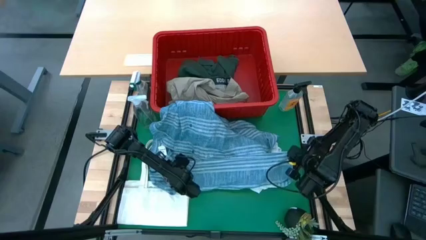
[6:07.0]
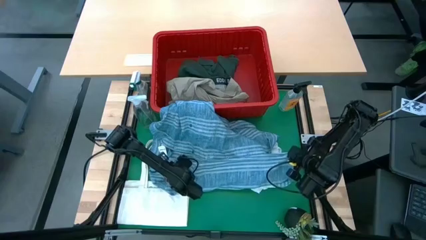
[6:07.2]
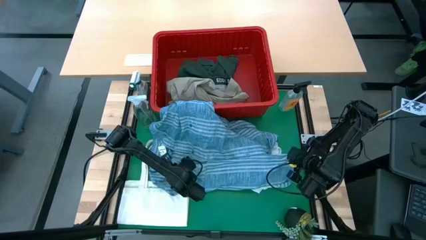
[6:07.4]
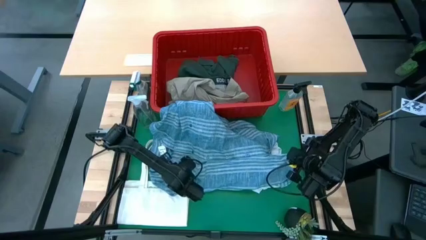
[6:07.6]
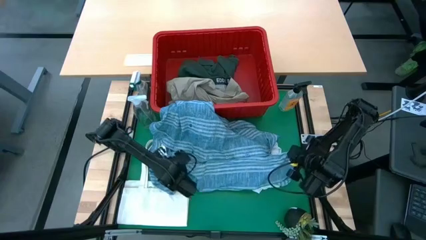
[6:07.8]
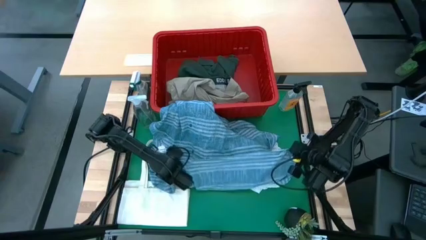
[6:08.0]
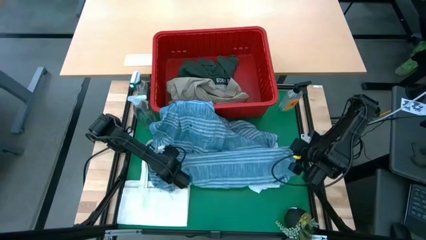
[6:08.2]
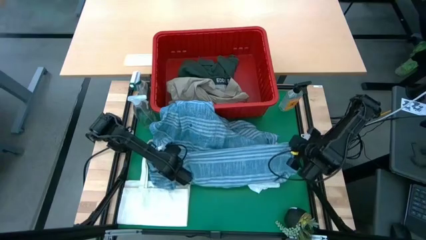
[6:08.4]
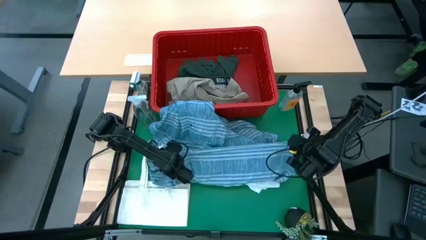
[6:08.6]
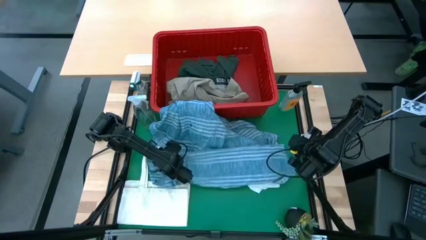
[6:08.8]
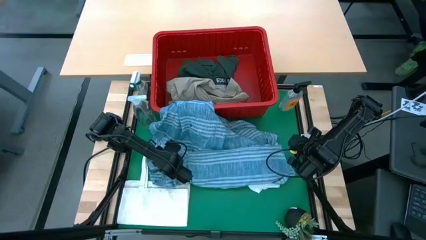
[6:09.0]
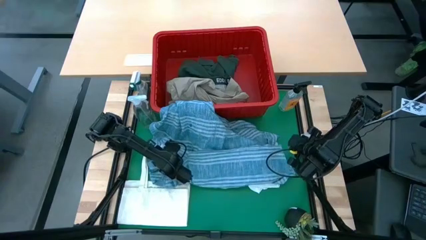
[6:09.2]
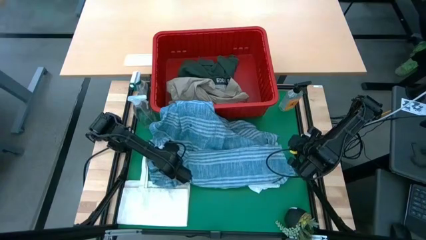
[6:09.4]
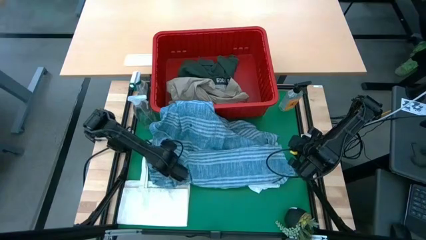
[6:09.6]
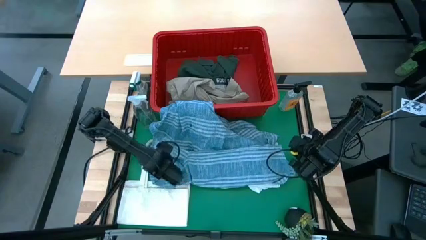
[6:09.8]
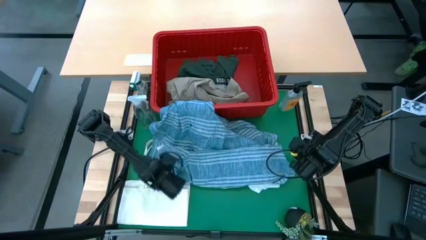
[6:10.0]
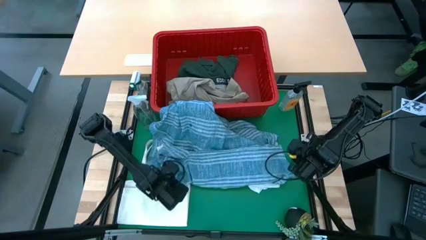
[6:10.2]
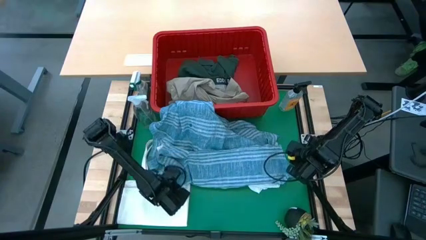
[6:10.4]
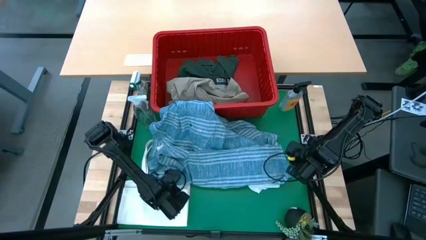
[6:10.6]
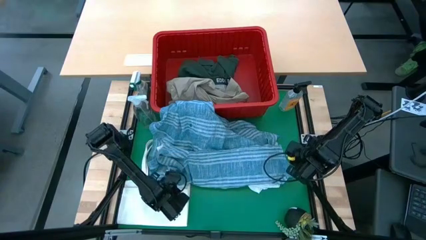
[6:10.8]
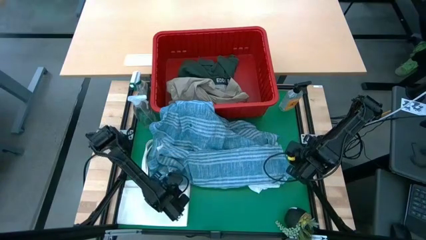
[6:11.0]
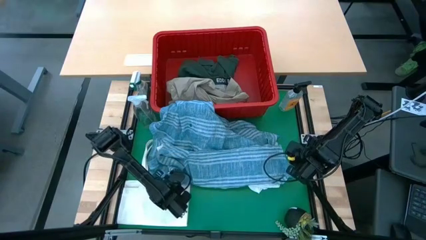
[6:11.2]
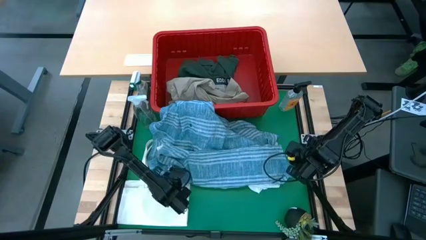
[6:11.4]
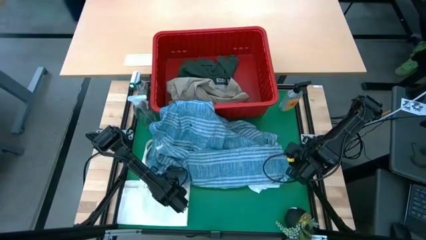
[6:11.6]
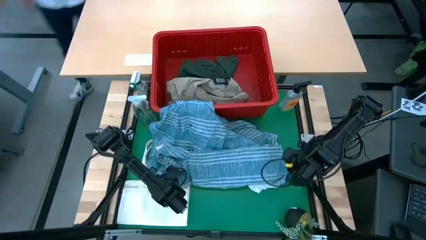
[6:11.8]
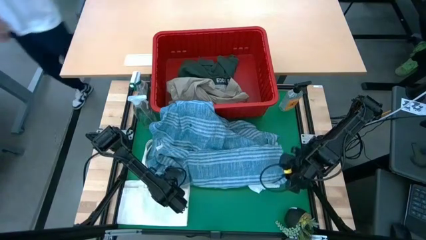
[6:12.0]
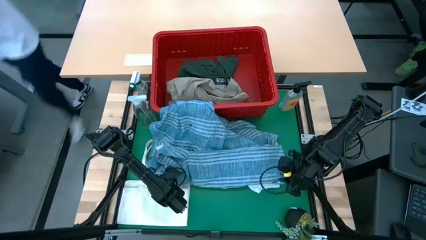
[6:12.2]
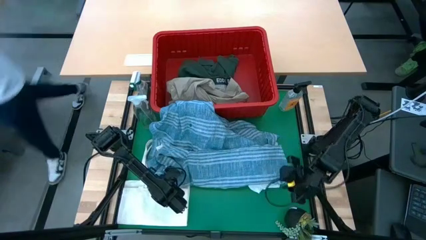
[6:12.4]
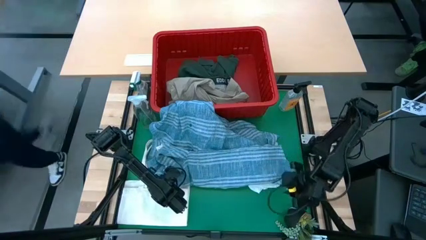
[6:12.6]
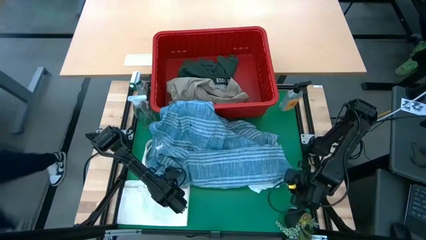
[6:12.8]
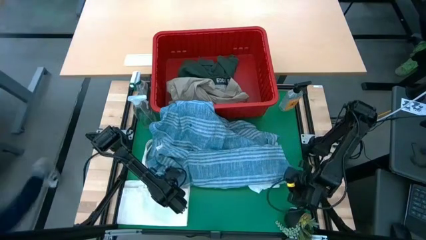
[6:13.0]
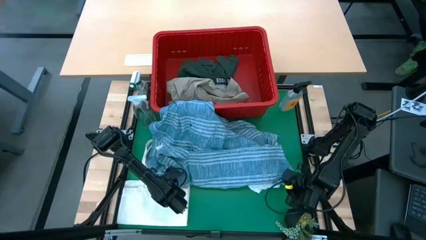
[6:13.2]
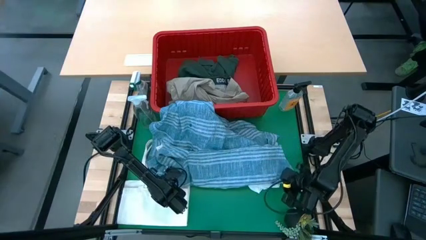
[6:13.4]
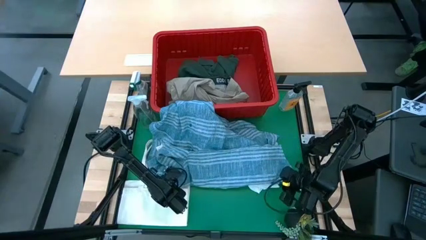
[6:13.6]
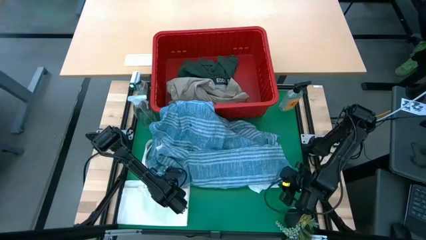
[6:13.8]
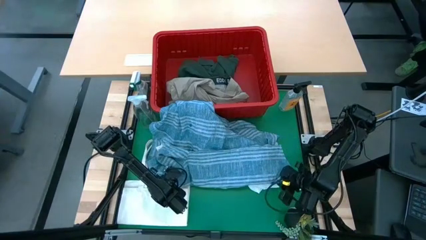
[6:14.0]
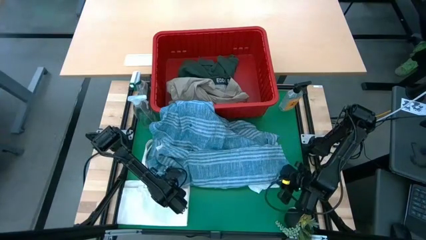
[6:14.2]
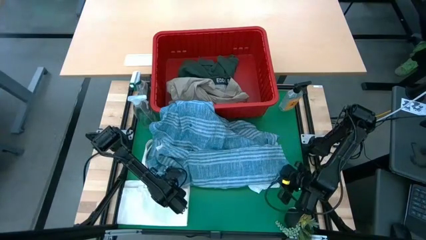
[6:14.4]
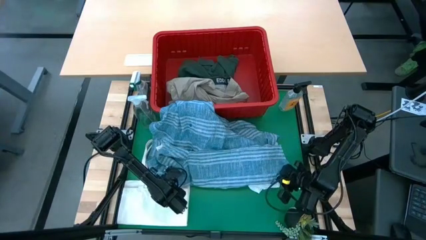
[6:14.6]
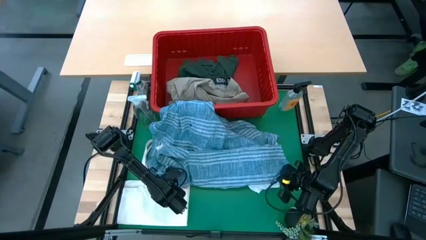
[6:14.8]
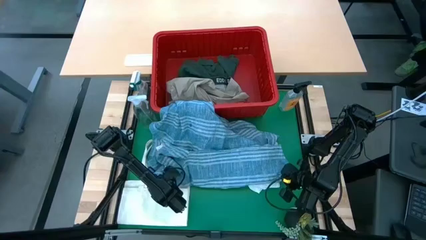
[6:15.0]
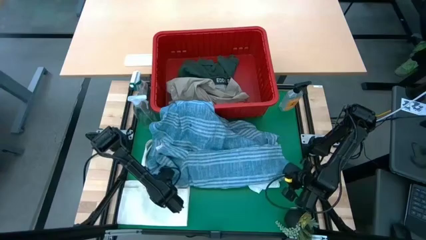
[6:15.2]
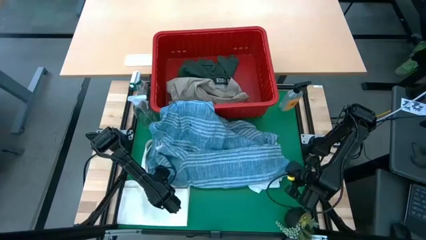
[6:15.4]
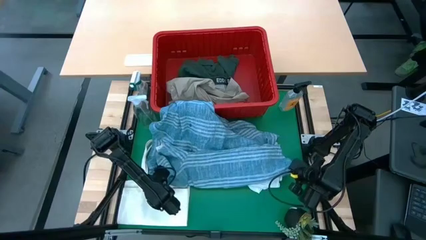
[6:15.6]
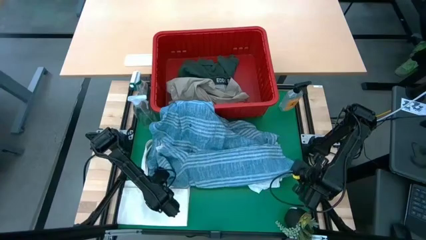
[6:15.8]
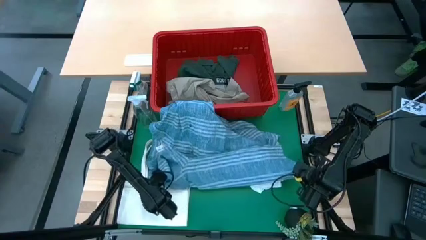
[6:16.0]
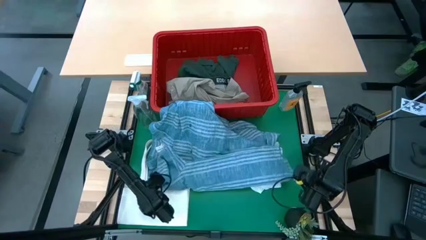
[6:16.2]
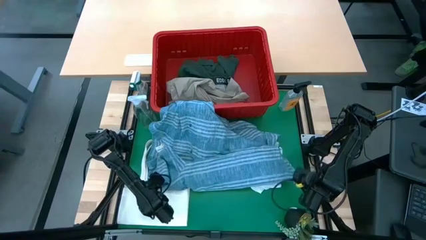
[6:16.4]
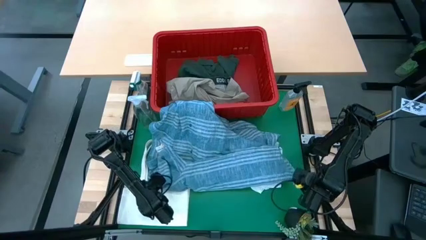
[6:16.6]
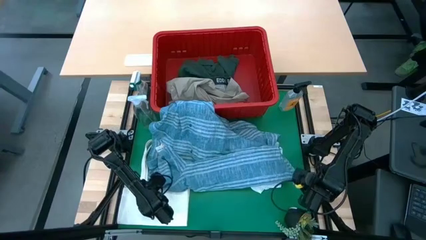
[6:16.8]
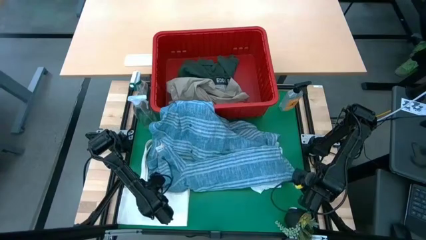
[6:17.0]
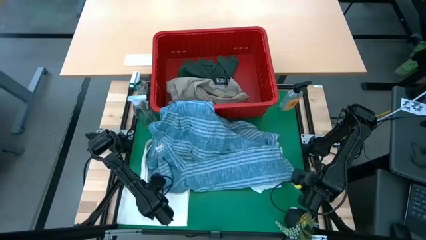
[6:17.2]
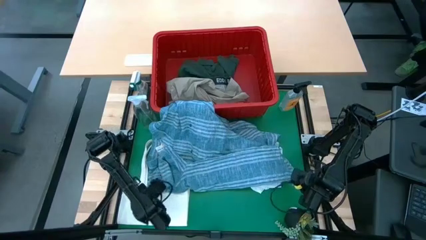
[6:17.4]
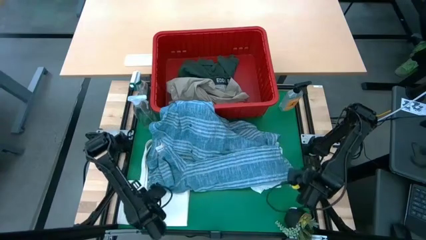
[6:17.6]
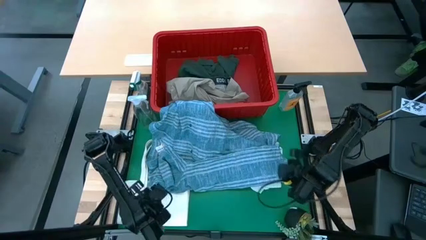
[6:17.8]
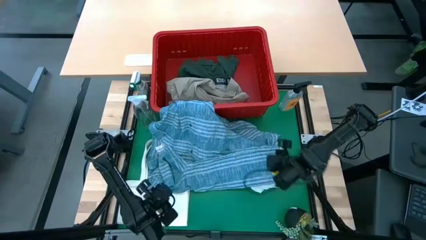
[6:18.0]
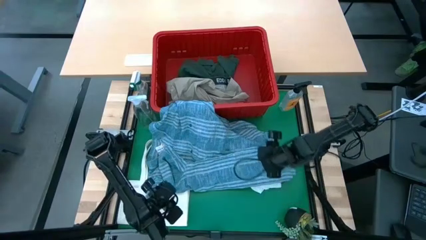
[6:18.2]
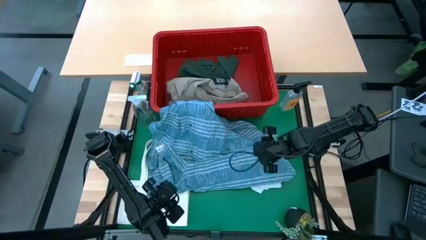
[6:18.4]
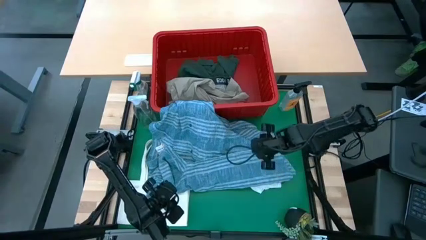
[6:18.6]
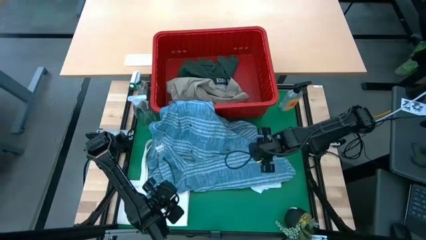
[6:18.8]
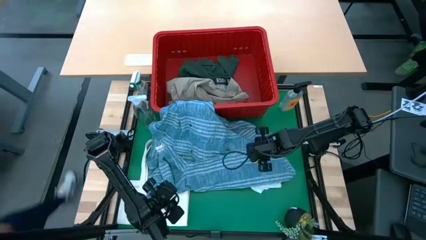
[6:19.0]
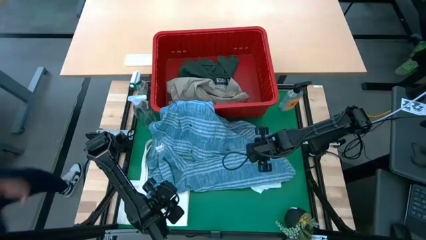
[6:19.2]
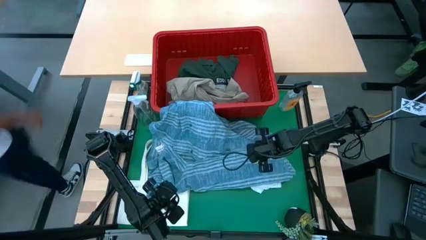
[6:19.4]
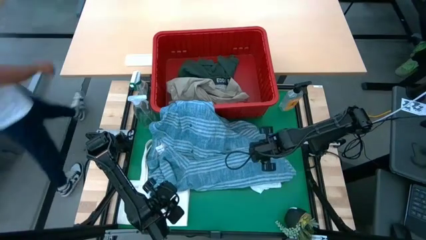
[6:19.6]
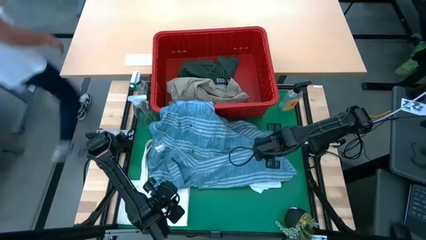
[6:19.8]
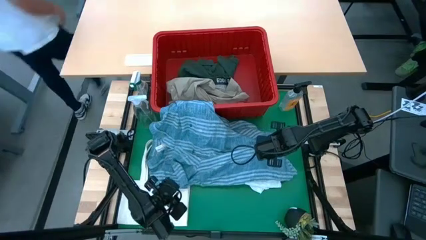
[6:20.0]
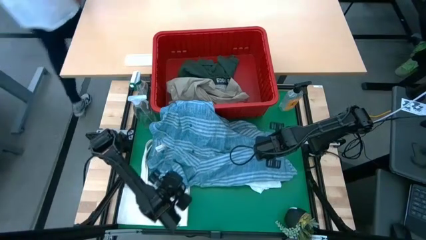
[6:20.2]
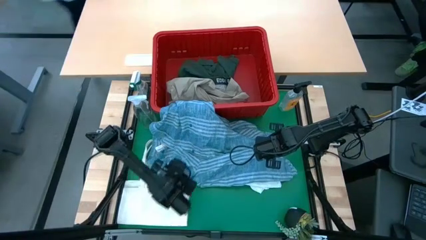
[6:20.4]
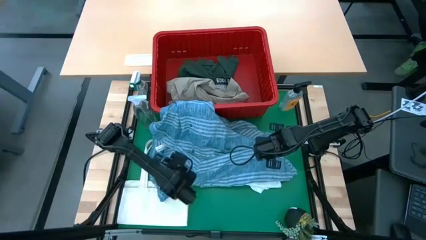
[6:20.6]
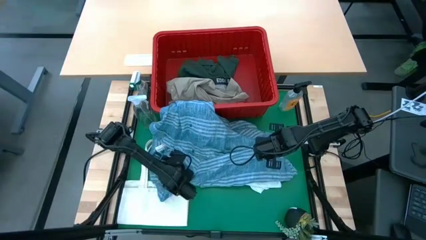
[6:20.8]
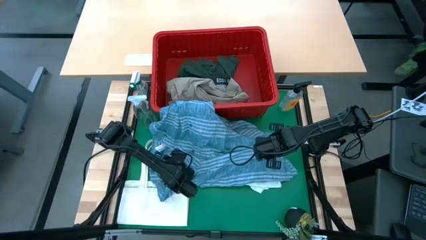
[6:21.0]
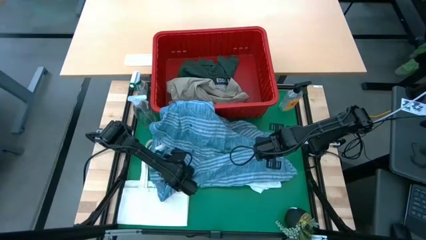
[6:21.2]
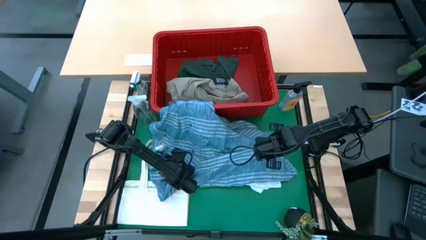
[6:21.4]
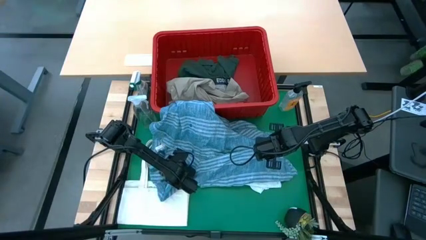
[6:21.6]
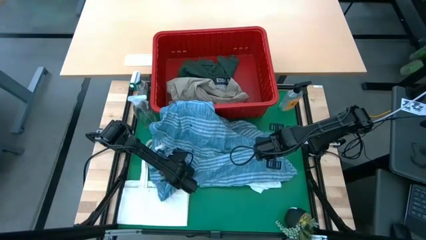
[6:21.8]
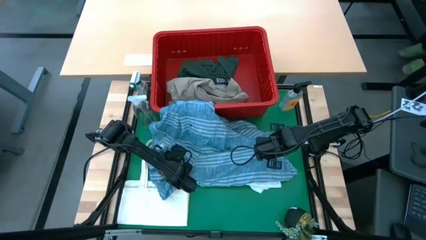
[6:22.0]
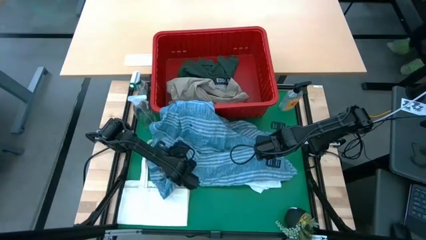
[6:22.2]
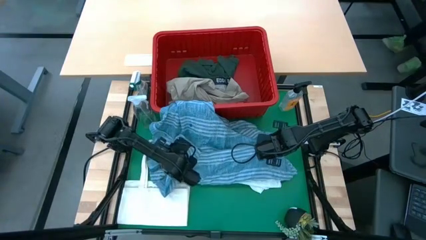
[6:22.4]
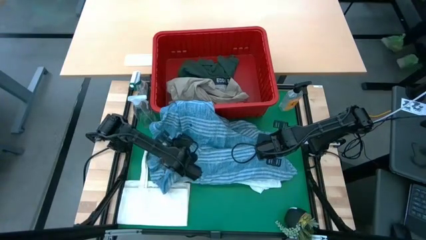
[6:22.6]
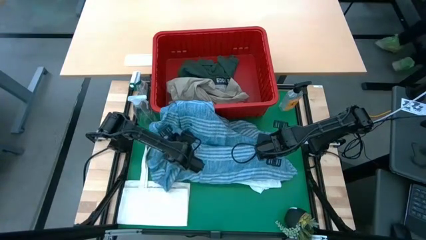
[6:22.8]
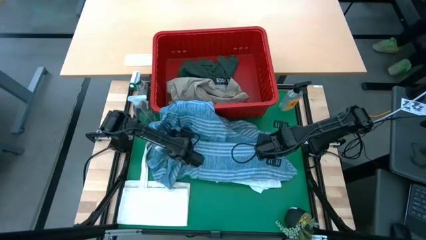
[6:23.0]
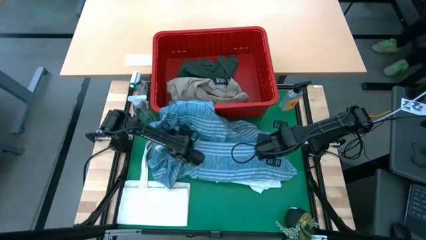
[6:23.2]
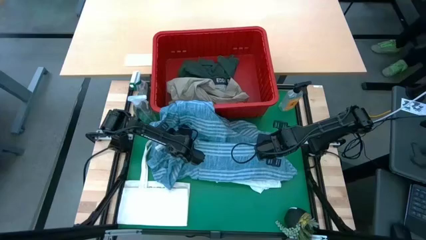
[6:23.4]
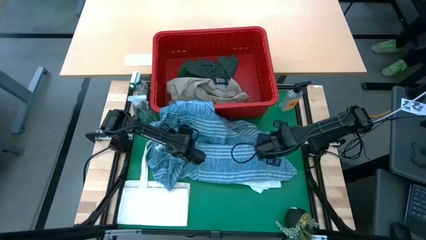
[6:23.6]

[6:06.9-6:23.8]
Task: Fold Laundry from Bin
Fold the blue checkered polo shirt
